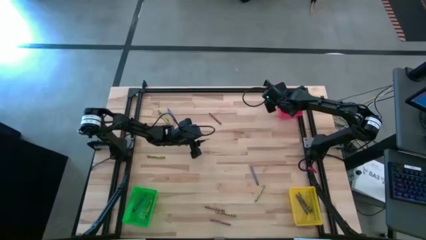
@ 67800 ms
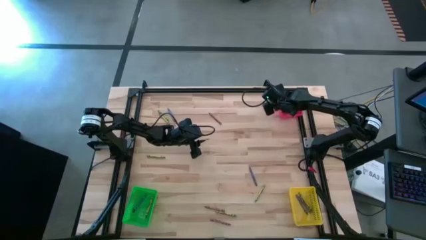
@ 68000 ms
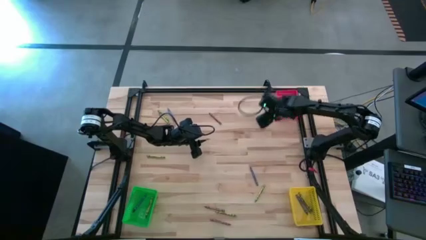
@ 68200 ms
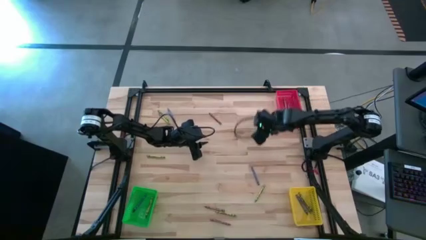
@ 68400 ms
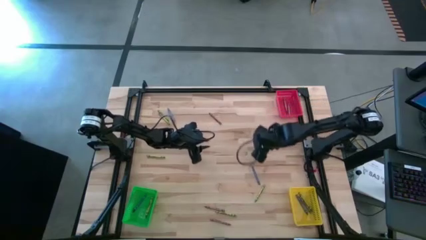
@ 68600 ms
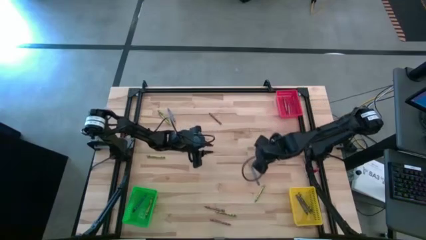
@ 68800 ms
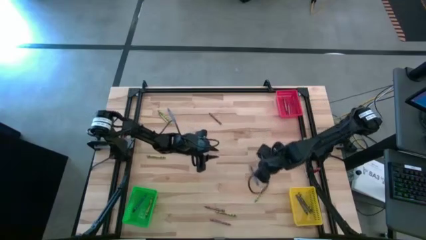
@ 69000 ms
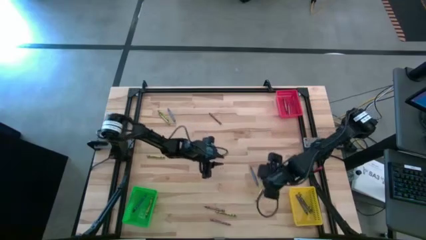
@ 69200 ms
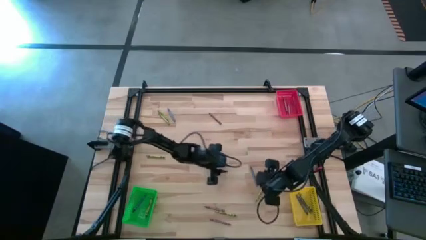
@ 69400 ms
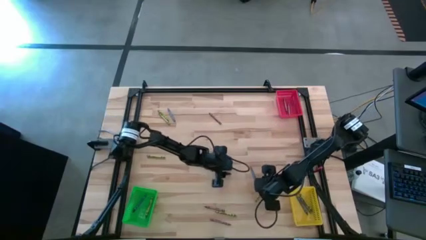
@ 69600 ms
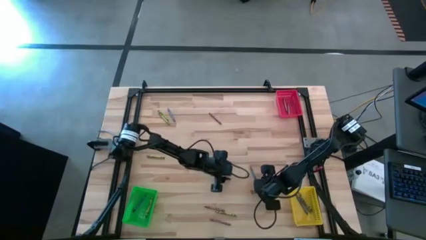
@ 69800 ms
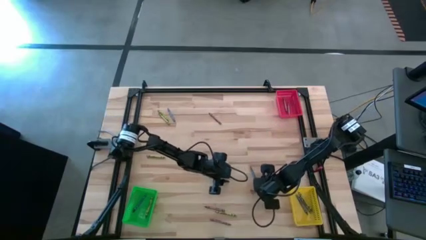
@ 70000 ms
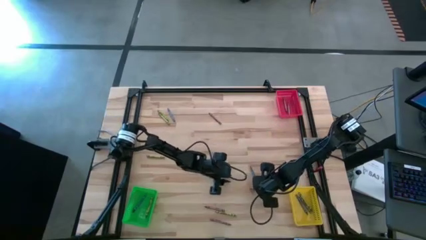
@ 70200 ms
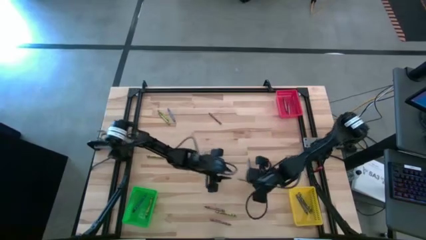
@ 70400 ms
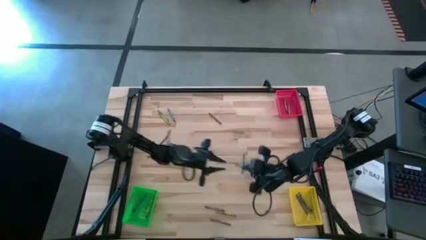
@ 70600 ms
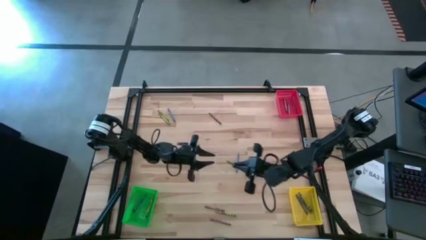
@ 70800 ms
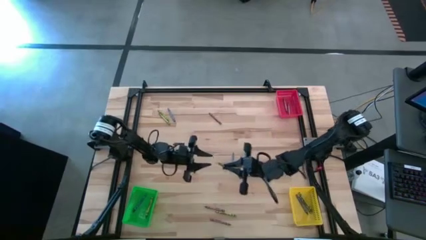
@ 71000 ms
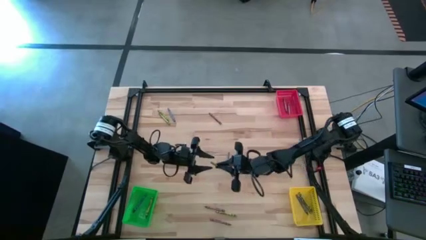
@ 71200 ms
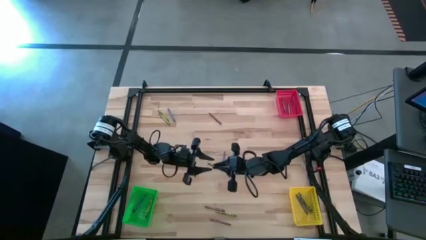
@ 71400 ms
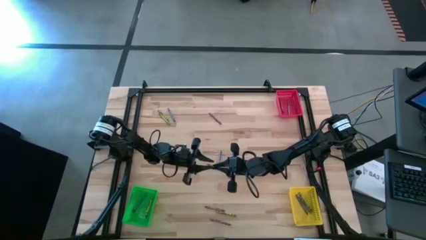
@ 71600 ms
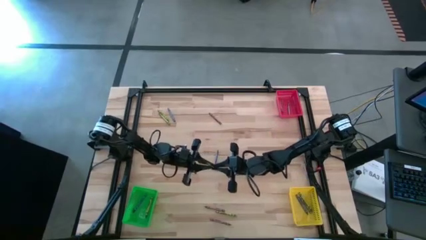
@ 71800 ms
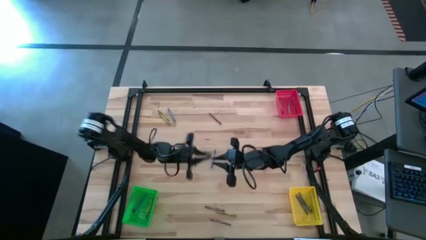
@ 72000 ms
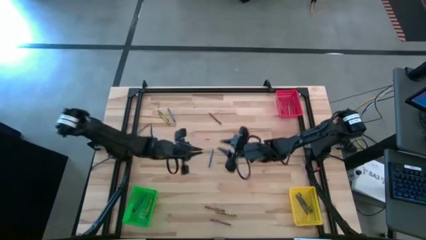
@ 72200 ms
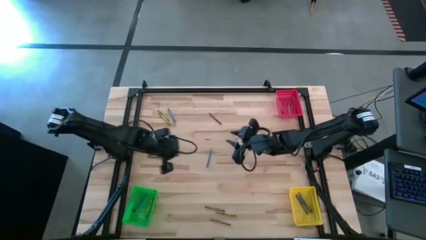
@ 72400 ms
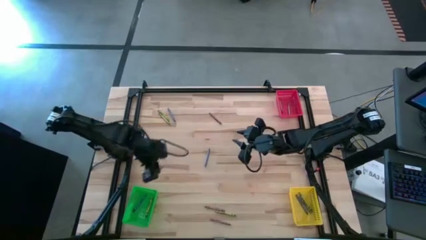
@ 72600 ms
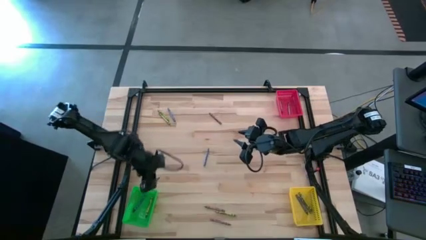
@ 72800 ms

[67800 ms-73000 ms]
Task: Sort crayons
Put the green crayon into the green bin

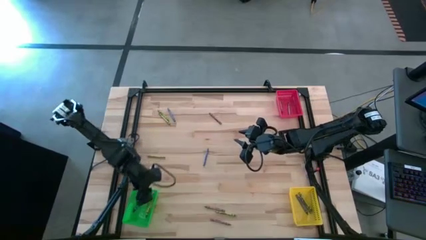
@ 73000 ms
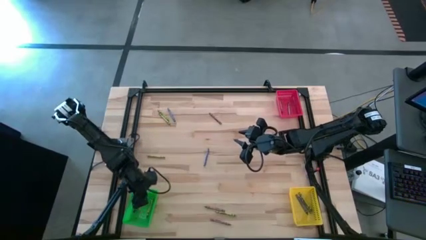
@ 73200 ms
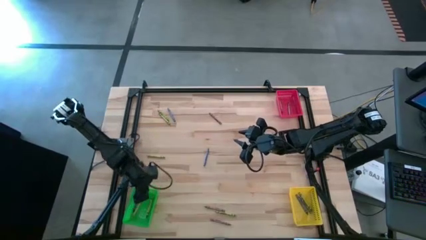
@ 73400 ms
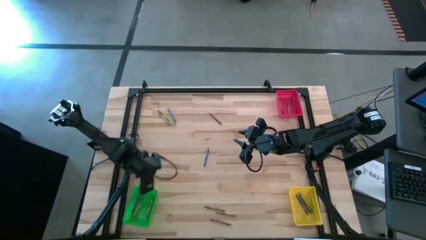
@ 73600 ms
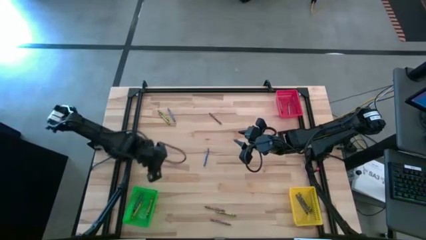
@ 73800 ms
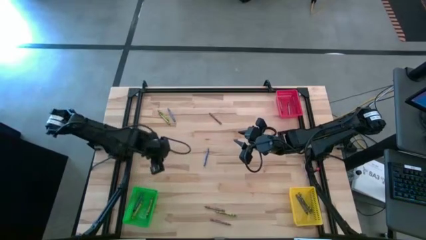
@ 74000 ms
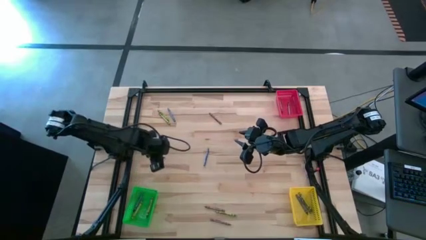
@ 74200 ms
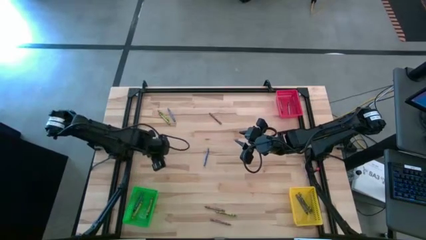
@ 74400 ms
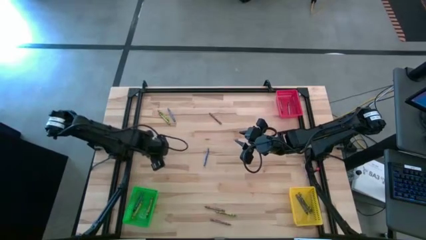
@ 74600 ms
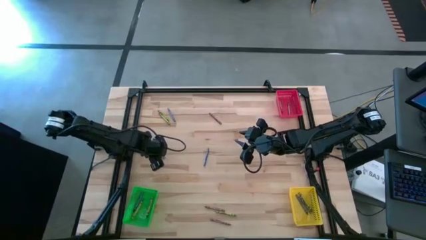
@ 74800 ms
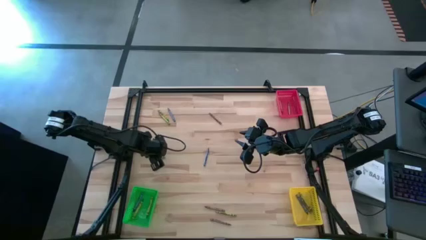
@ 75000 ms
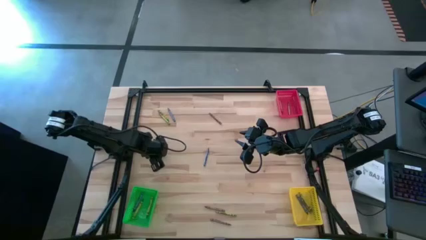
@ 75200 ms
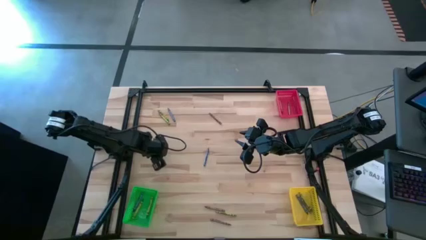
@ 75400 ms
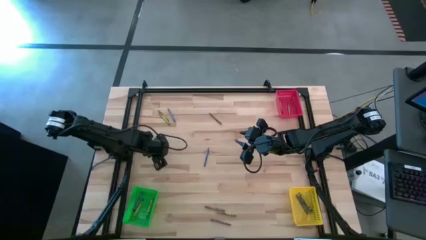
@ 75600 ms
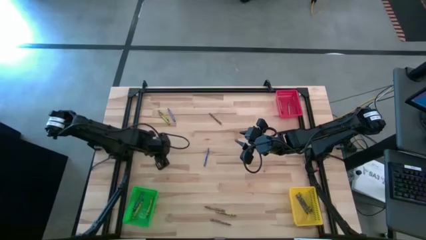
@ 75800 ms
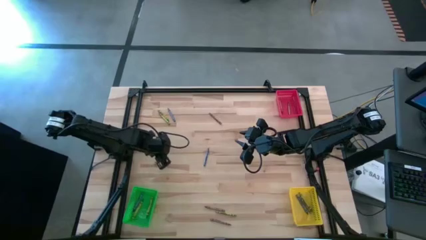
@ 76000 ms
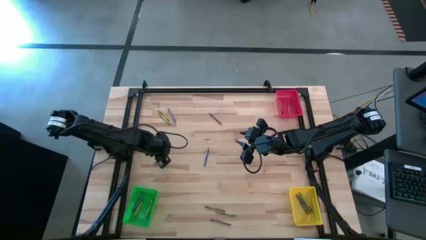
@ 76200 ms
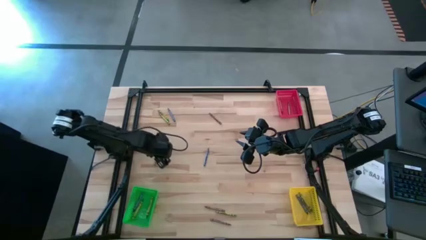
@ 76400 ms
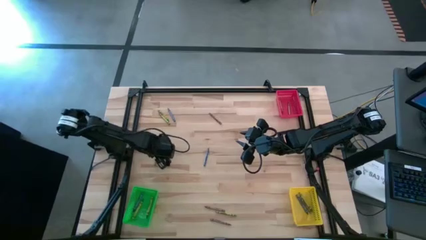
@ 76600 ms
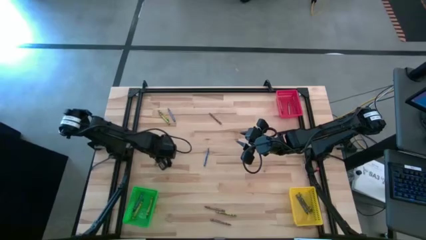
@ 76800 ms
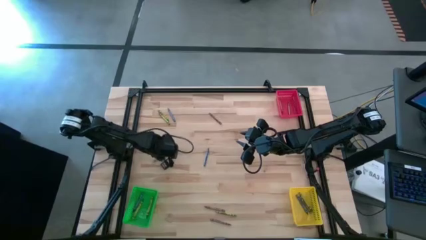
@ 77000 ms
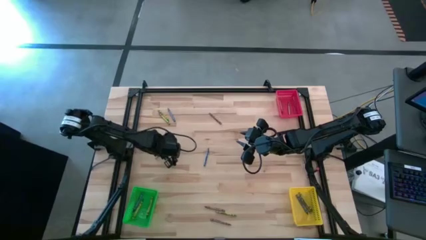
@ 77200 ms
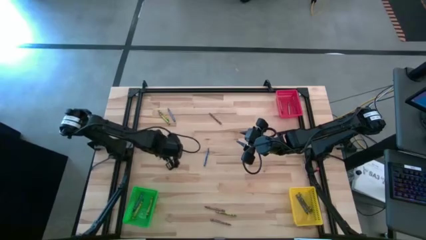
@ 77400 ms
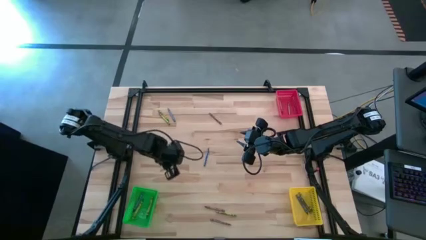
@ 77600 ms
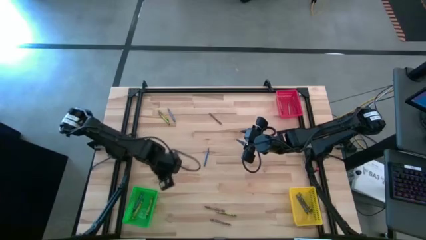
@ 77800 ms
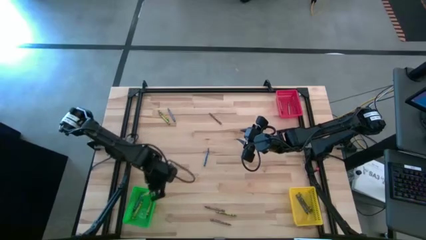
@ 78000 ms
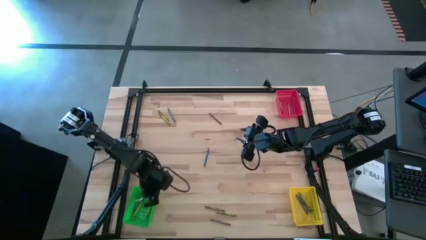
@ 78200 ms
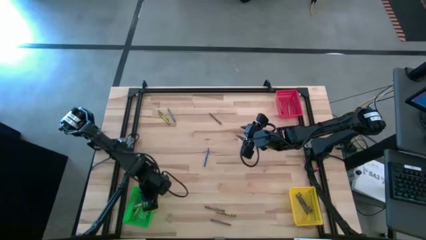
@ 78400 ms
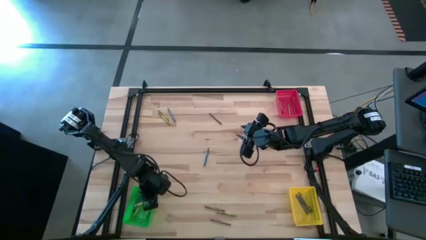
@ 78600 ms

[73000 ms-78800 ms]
Put the green crayon into the green bin

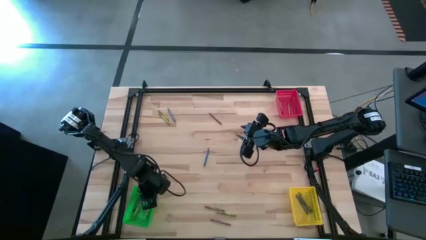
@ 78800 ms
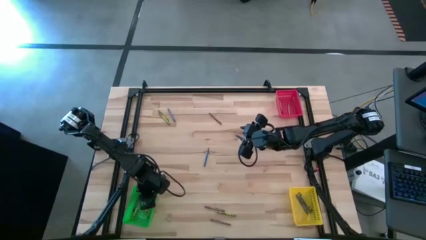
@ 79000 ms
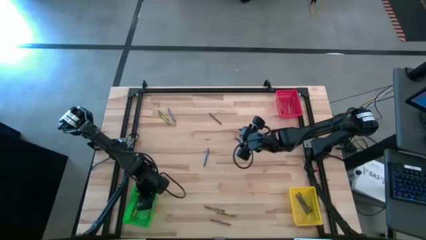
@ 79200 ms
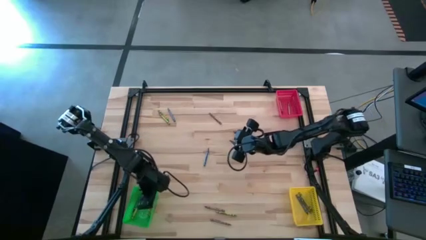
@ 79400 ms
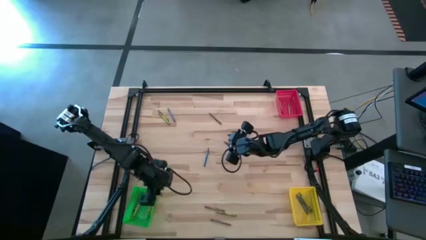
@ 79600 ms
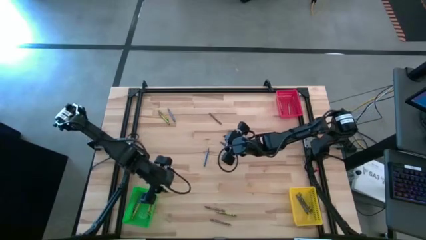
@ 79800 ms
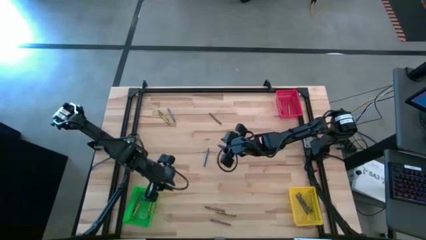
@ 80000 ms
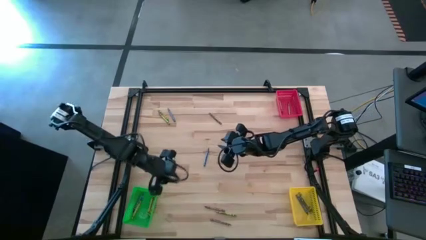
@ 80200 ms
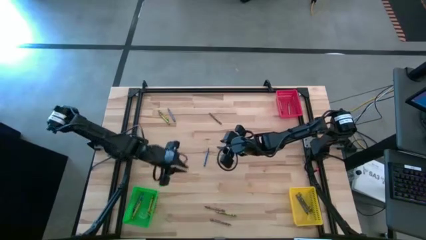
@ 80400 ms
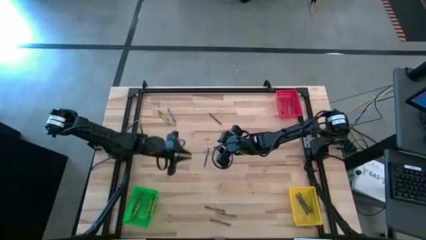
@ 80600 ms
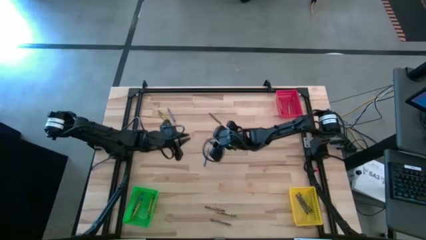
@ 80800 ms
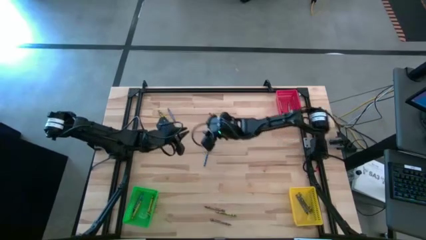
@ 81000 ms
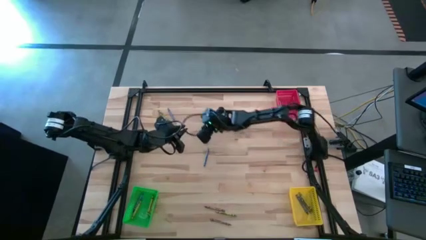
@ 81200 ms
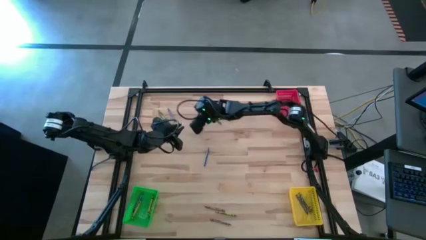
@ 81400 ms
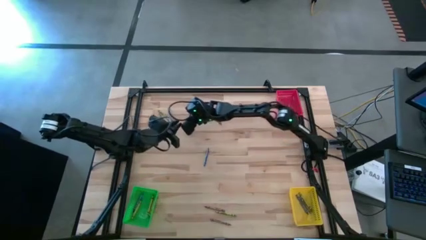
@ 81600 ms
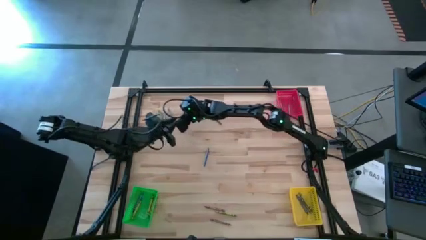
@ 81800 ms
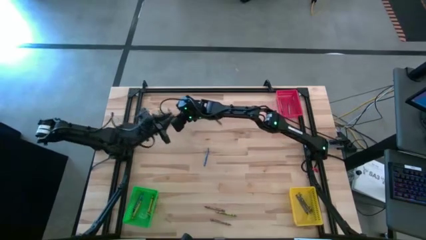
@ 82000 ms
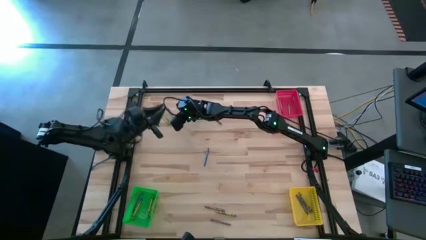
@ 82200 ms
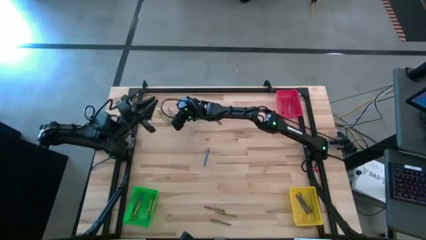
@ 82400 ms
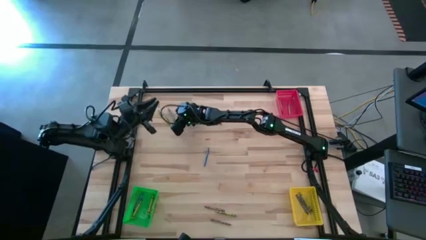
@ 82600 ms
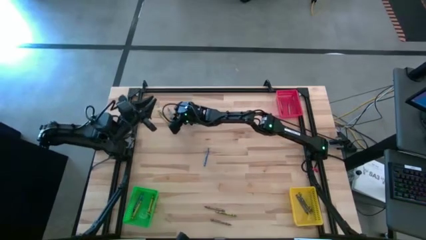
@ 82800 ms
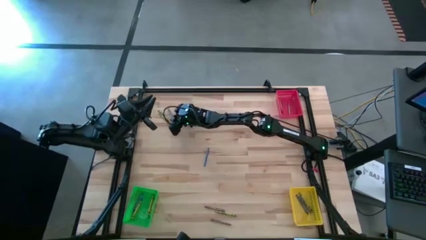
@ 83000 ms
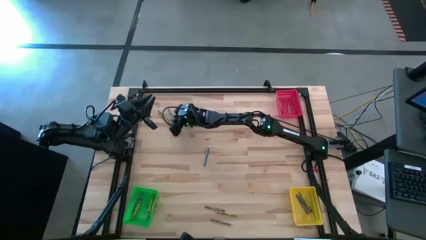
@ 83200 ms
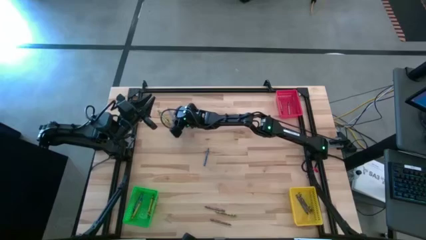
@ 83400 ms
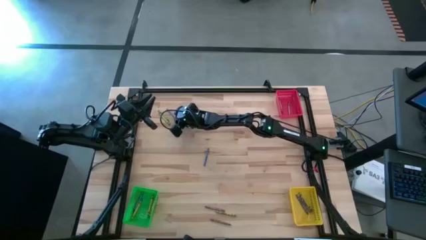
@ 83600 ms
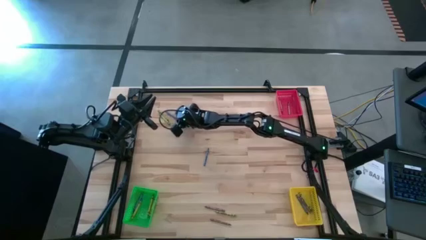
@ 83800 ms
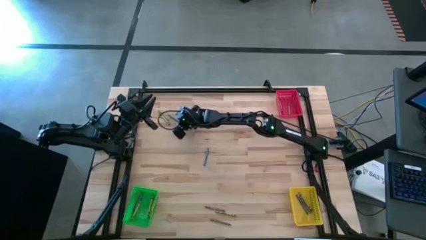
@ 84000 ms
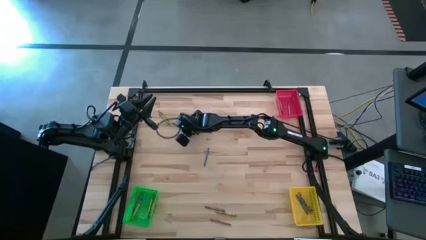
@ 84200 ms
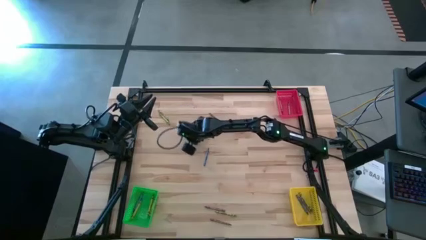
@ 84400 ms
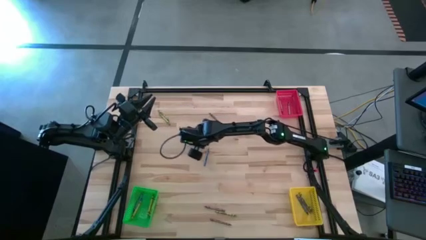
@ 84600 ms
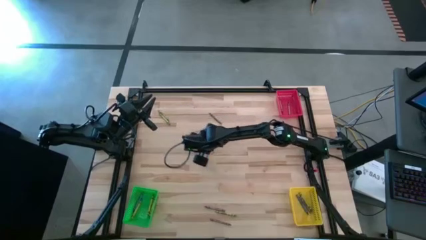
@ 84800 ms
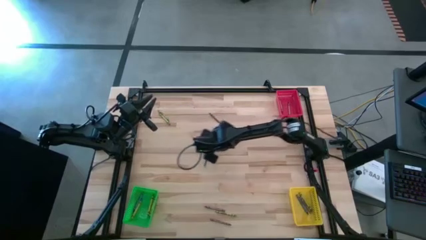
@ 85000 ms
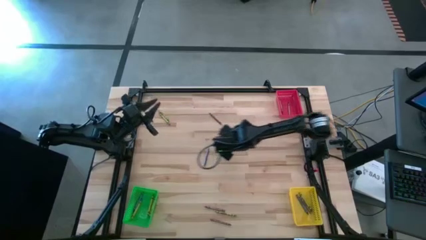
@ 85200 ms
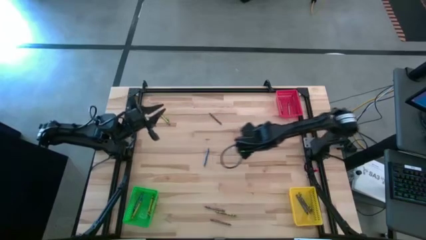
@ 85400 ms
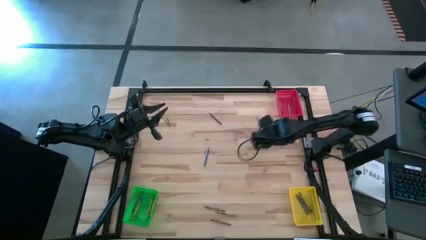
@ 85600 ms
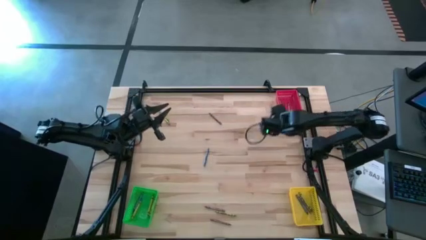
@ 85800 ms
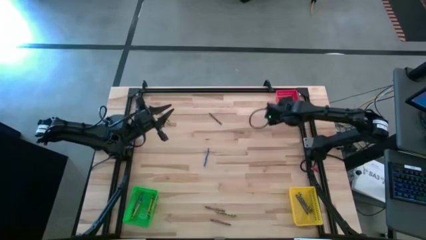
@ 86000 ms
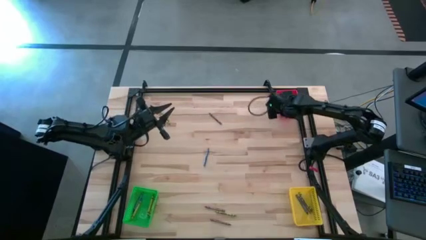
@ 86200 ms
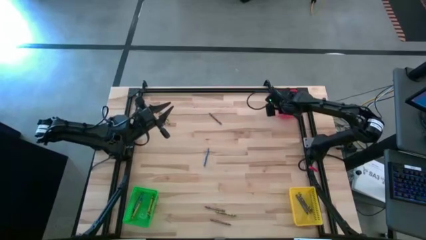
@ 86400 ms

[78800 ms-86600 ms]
Put the blue crayon into the red bin
